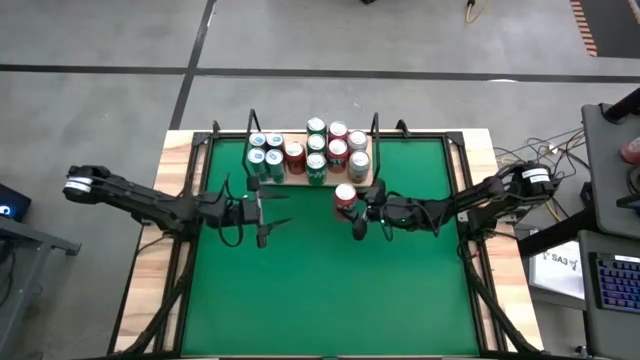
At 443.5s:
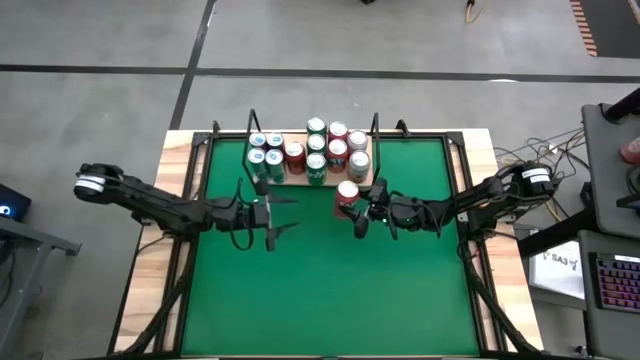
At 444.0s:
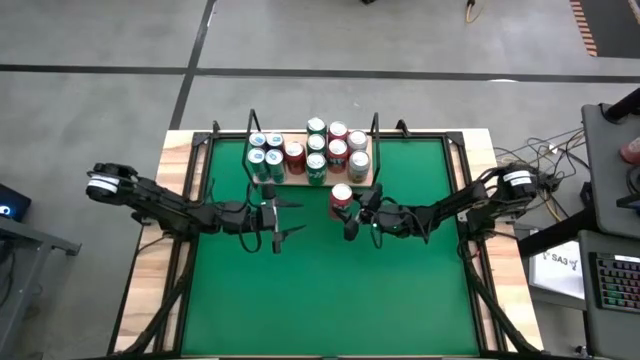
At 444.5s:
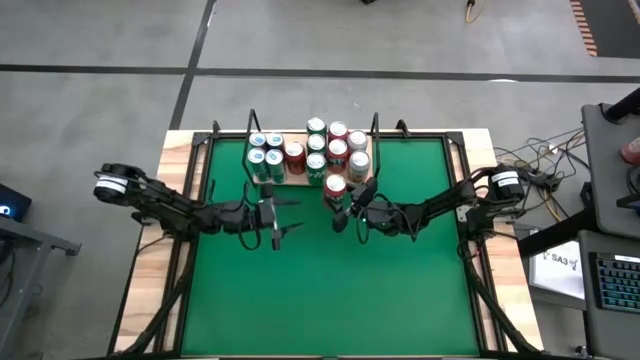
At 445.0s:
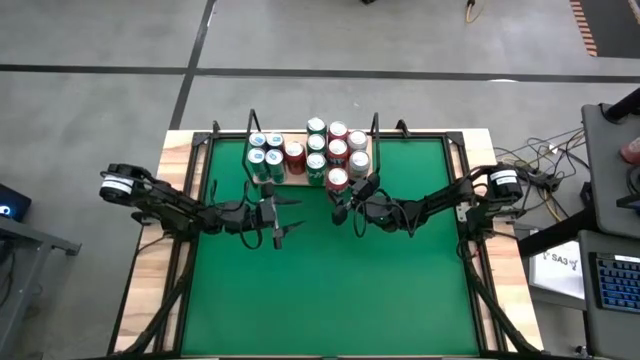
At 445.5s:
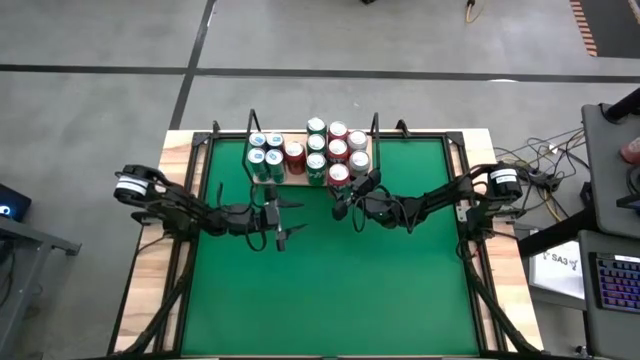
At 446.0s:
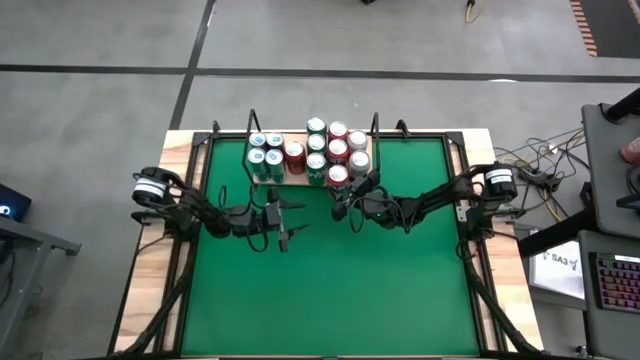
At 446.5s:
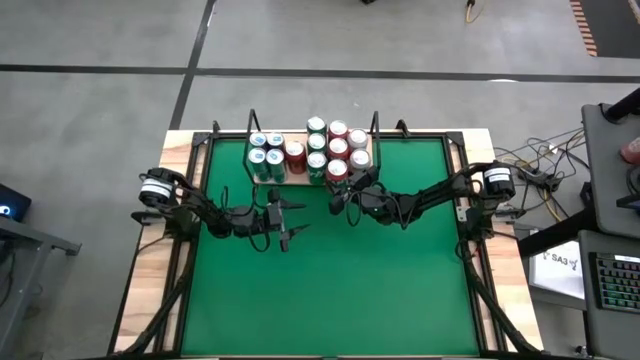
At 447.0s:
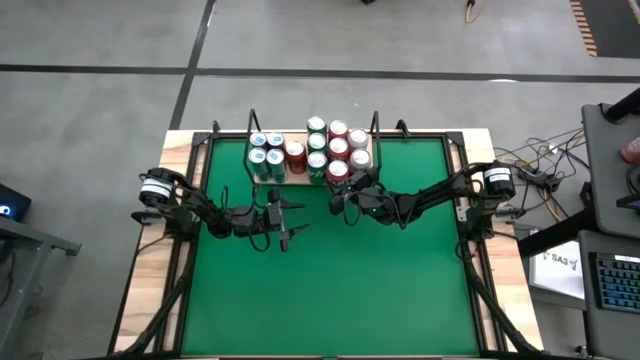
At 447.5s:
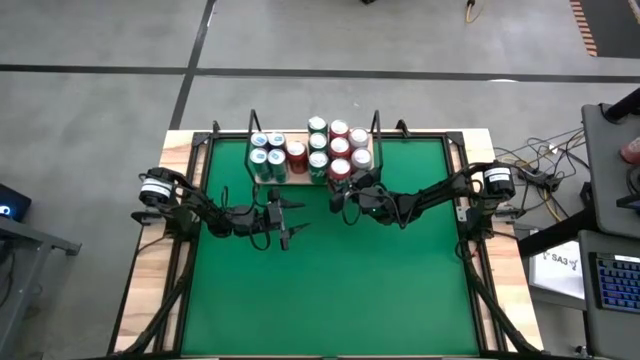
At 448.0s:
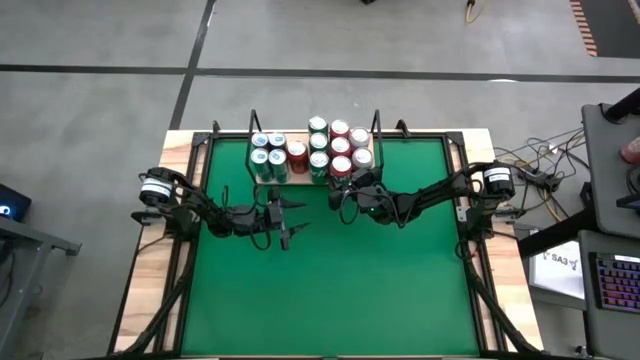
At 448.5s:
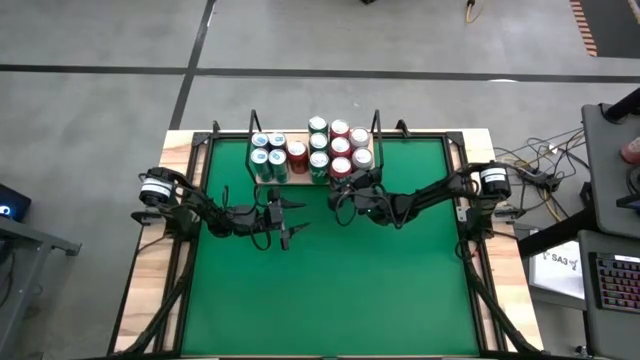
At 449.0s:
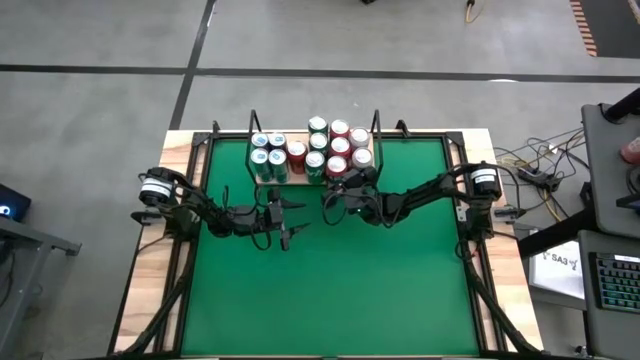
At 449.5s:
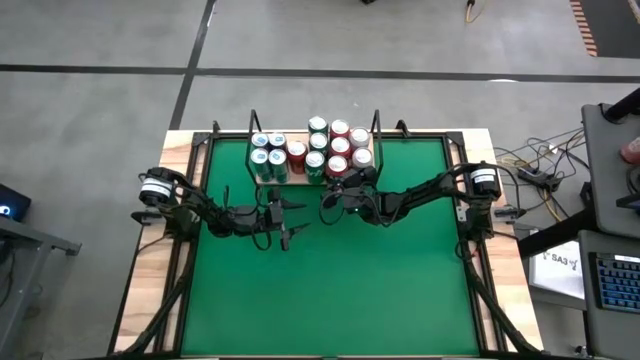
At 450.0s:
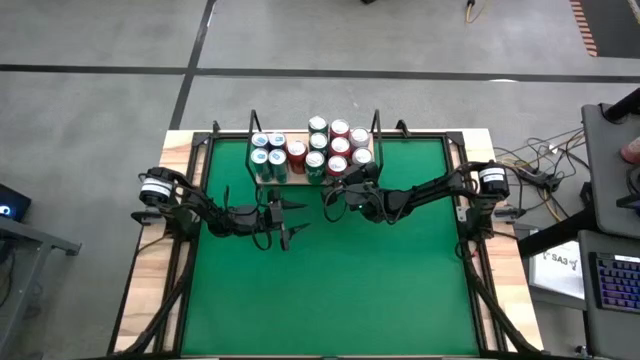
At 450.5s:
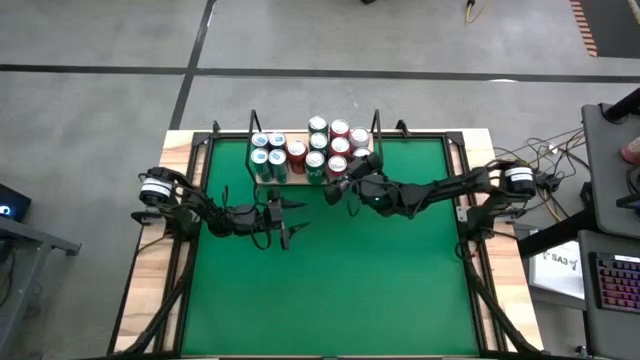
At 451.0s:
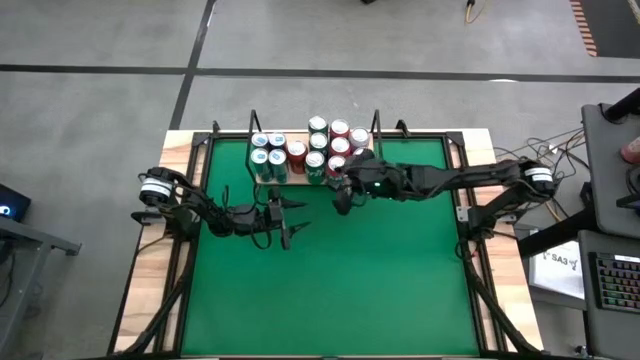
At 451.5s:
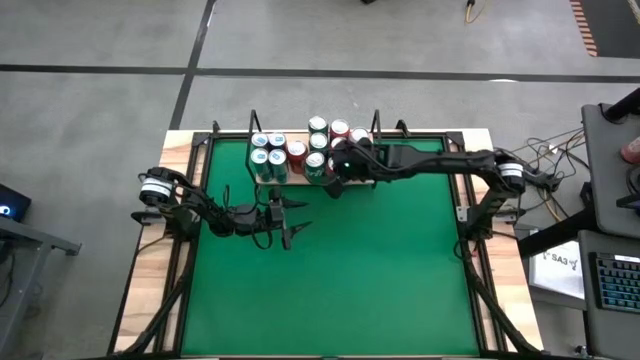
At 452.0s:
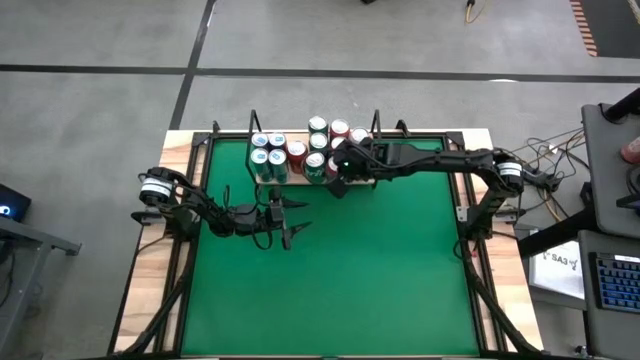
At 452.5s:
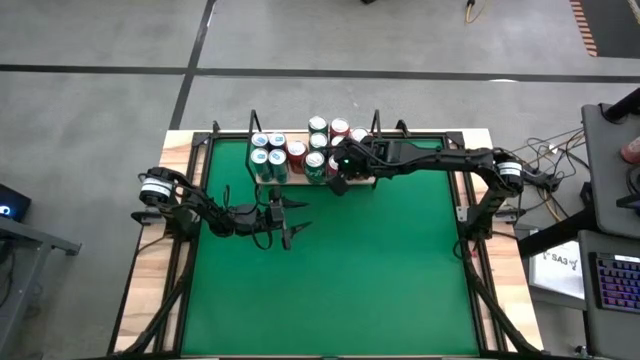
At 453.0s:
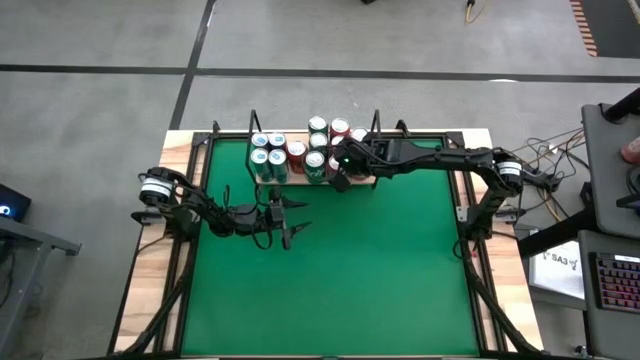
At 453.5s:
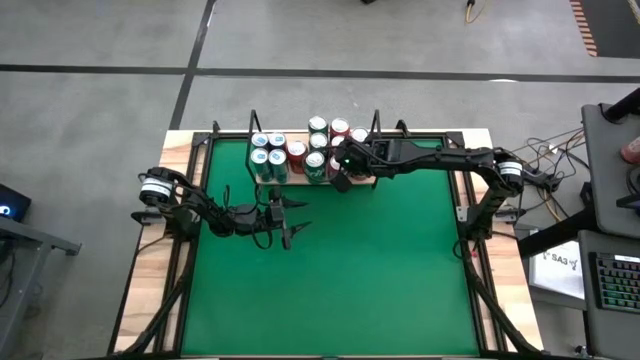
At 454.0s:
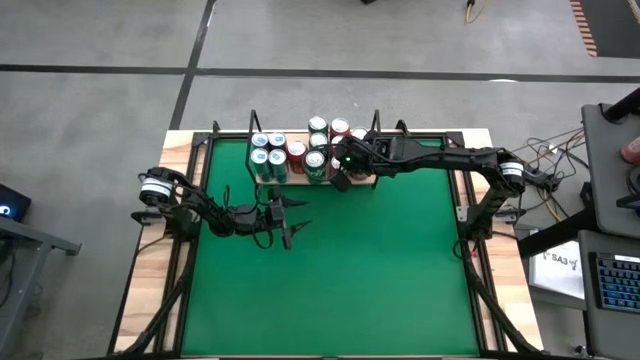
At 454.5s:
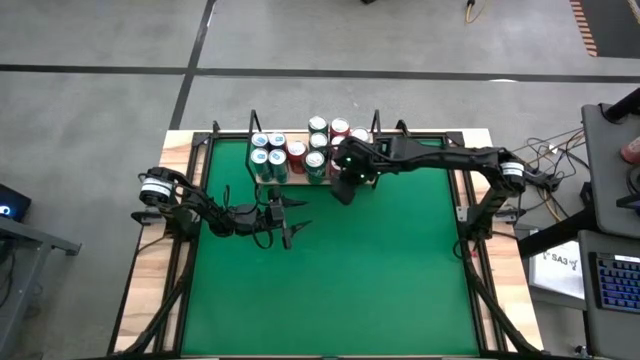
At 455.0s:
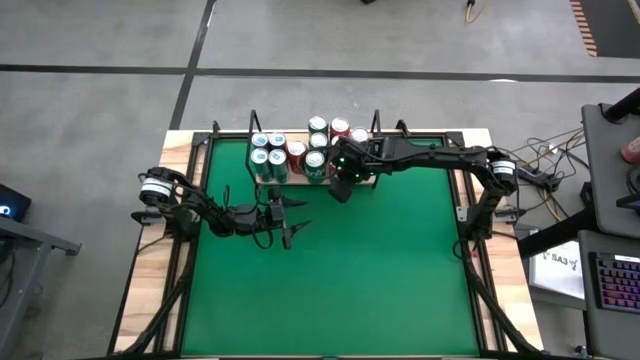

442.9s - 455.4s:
Task: Pick and place cans onto a shelf
Put the orange soda can on the shelf aligned with the other orange soda can

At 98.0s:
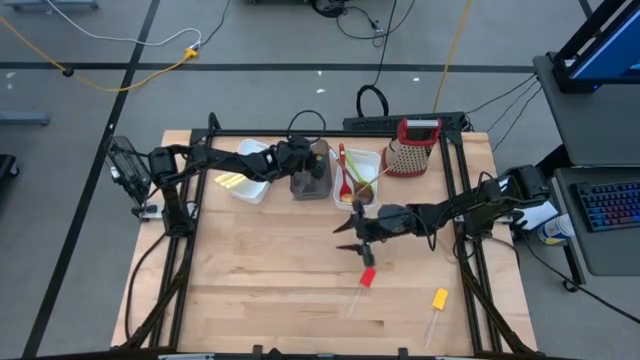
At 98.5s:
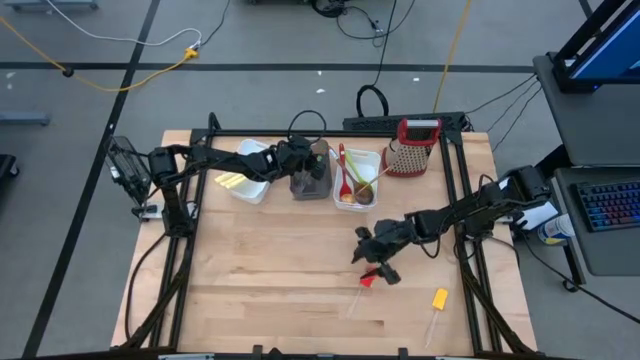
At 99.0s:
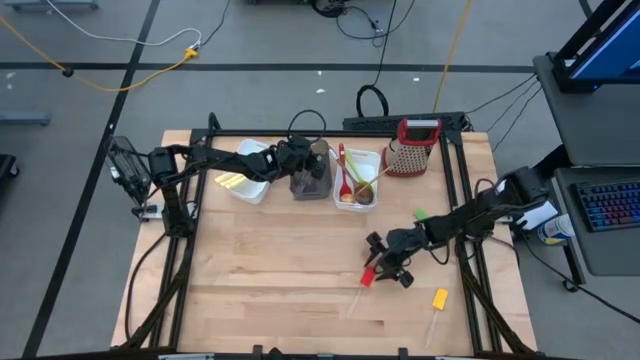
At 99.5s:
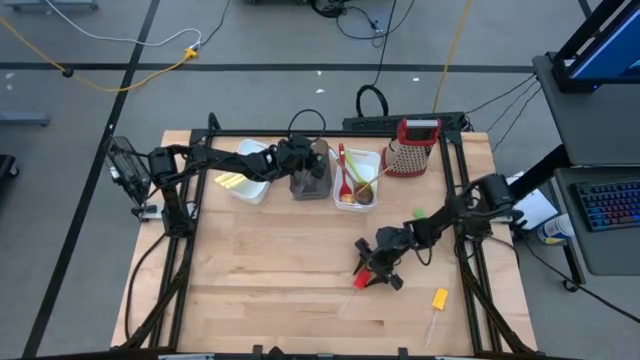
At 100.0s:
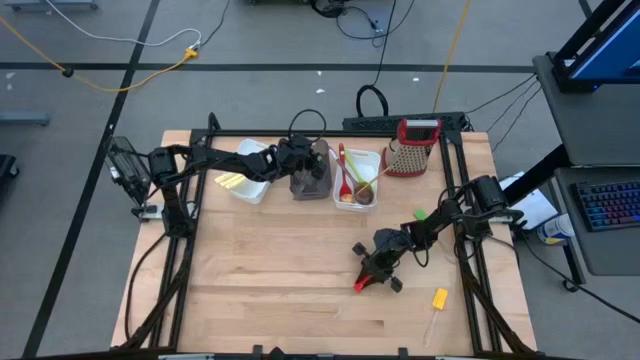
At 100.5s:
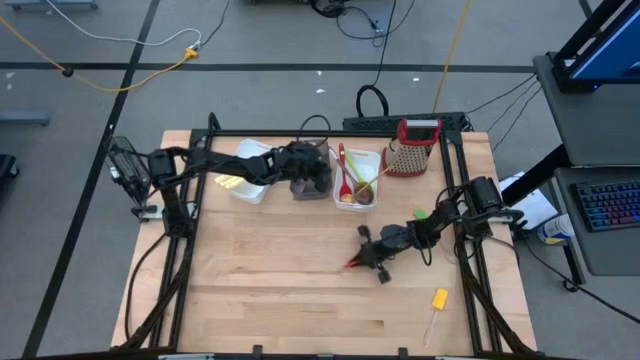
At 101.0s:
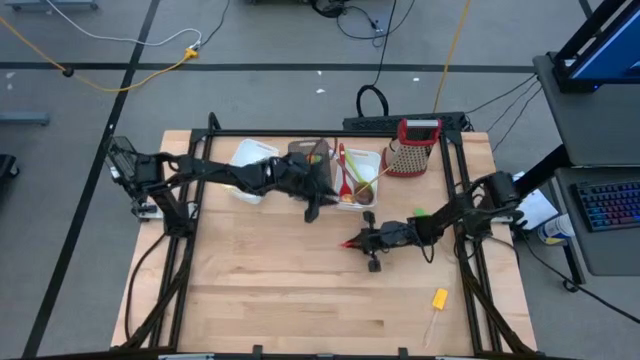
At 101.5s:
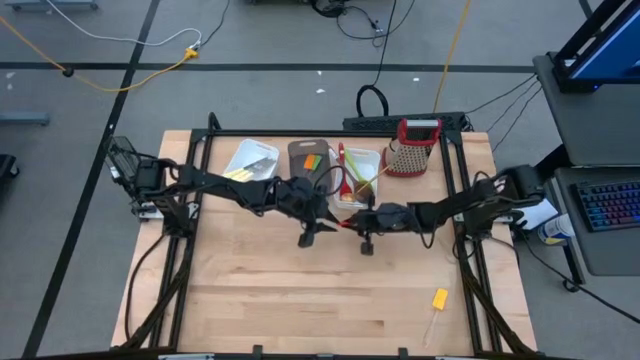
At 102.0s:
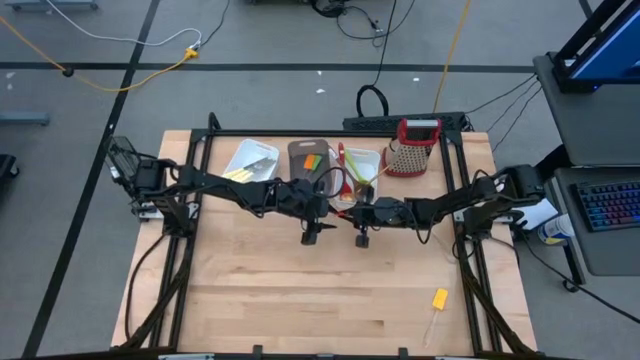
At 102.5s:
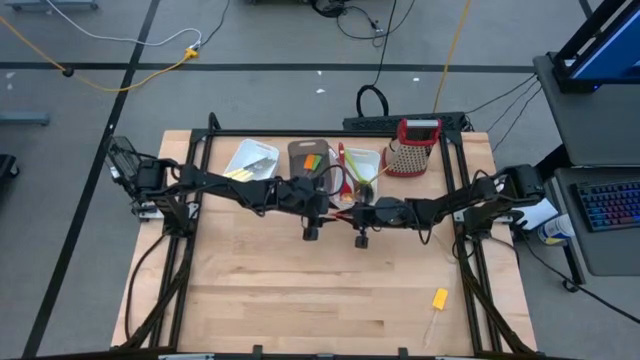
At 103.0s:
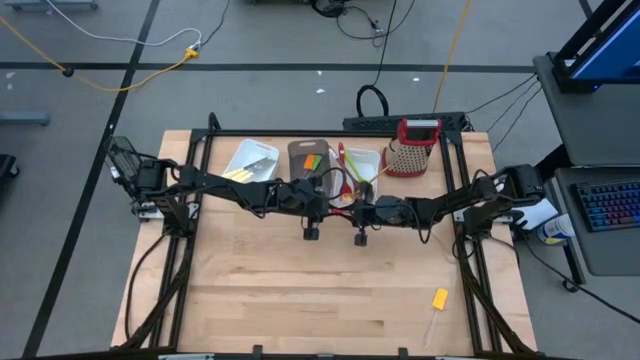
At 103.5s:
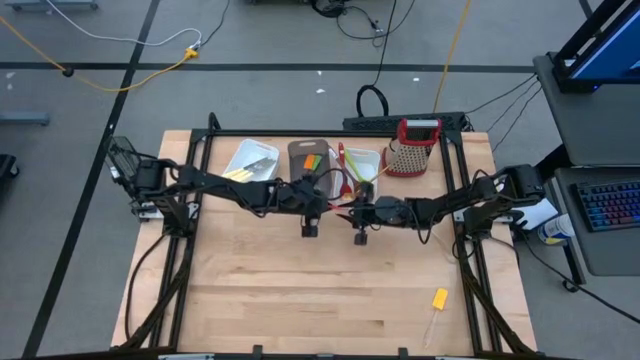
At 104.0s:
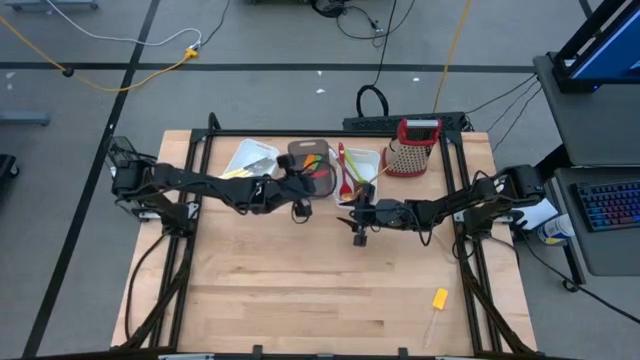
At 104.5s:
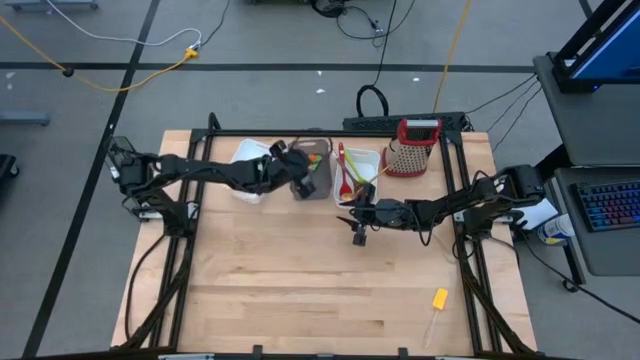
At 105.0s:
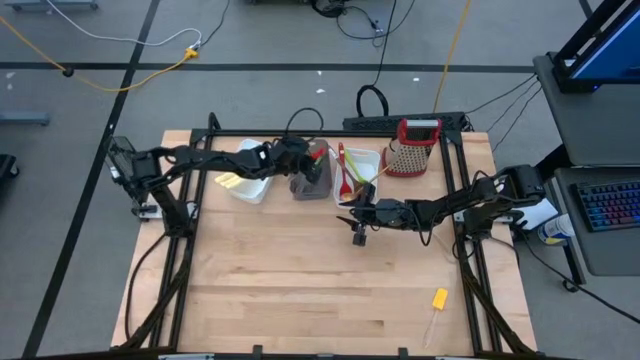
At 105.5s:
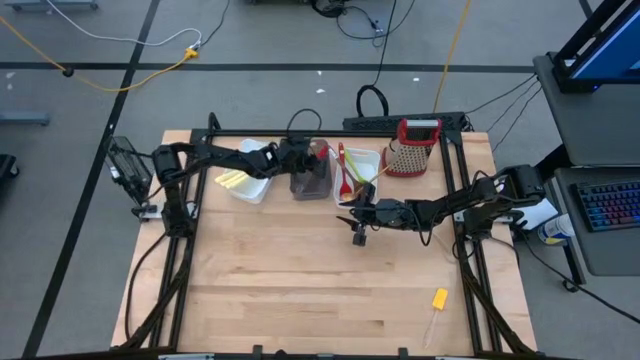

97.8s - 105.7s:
Task: Pick & Place Kitchen Items
Put the red spatula into the black bin

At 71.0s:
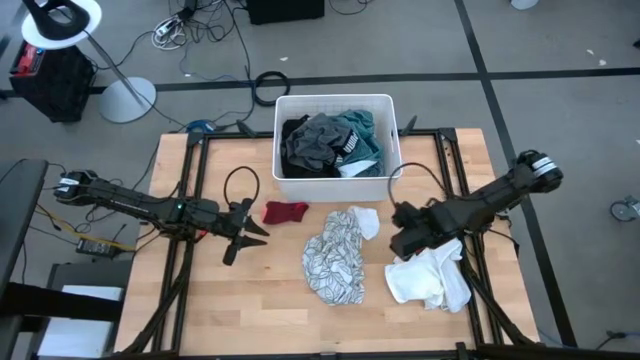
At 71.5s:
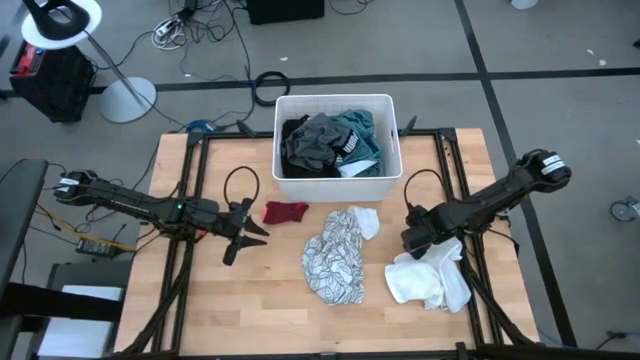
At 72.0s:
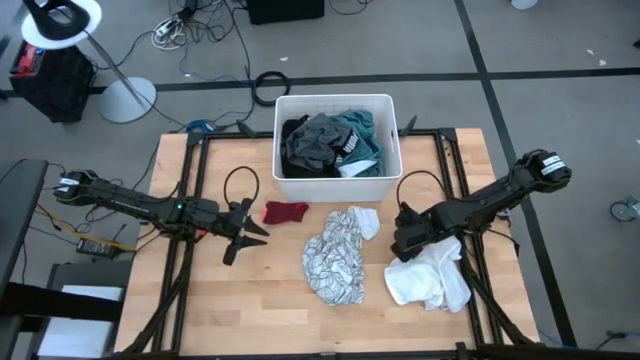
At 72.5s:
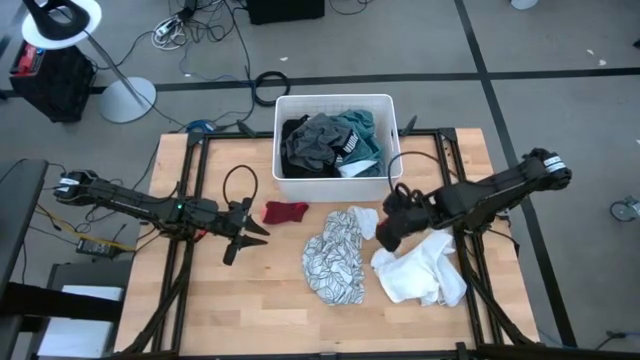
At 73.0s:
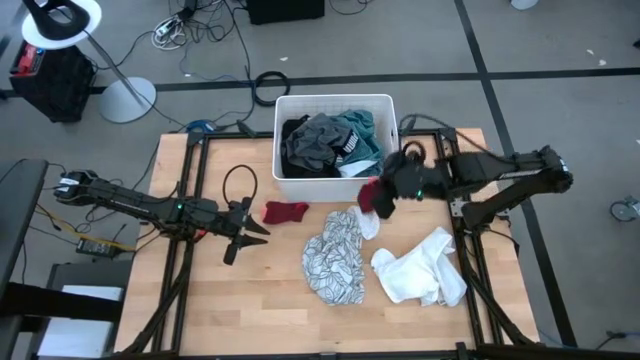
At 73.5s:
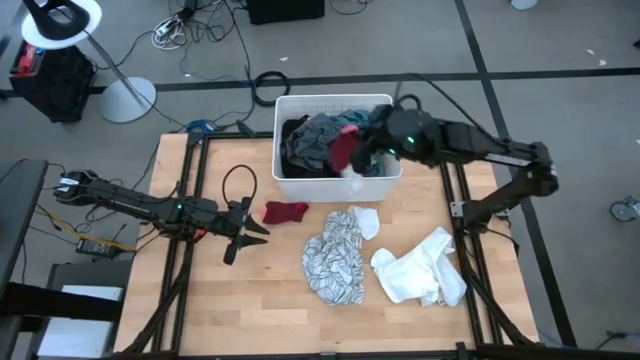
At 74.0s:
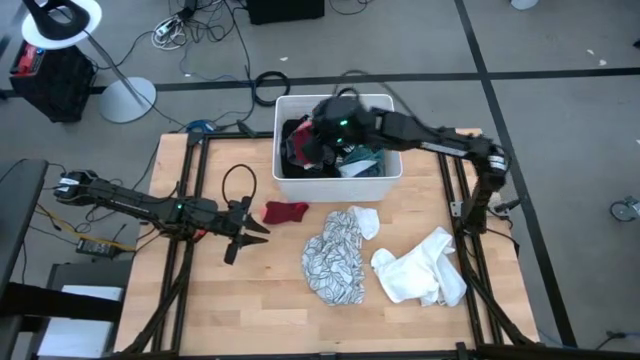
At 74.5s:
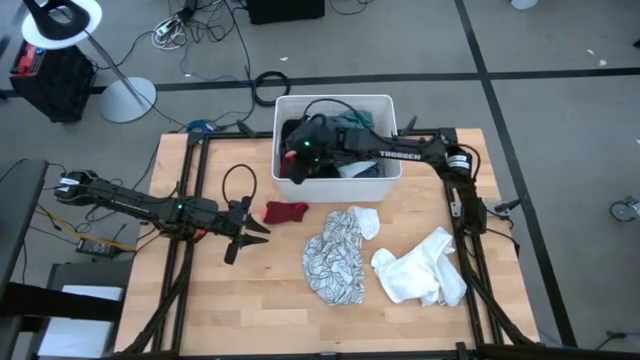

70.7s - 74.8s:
Task: Sort clothes
Put the right red sock into the white laundry bin
